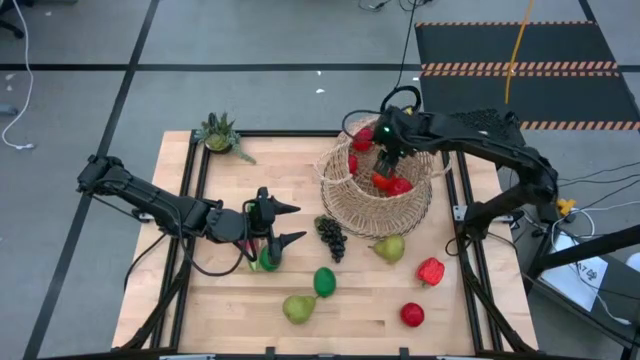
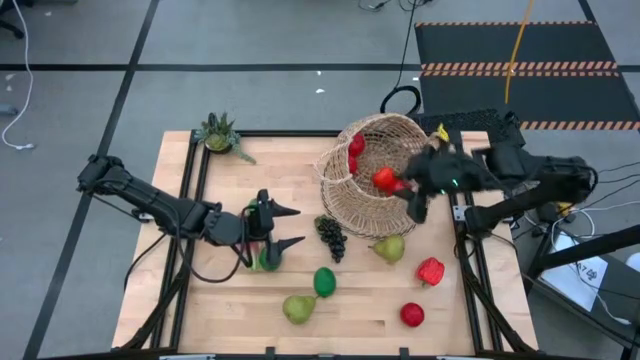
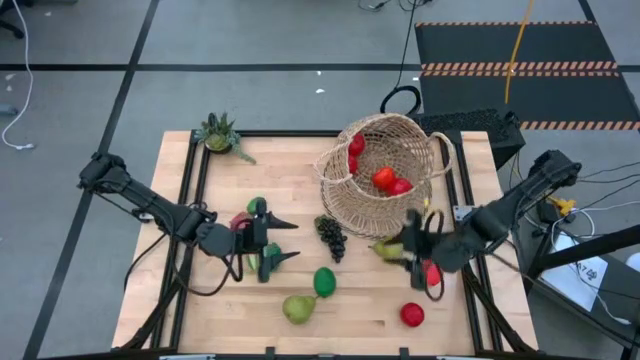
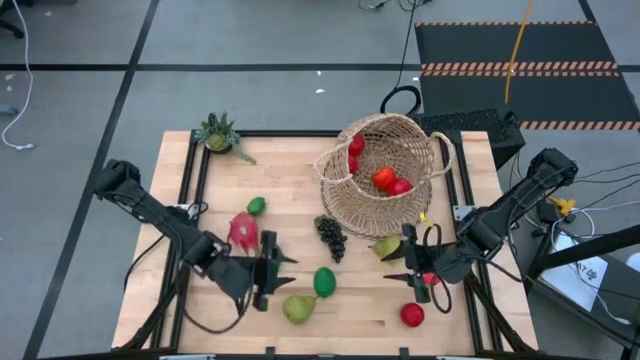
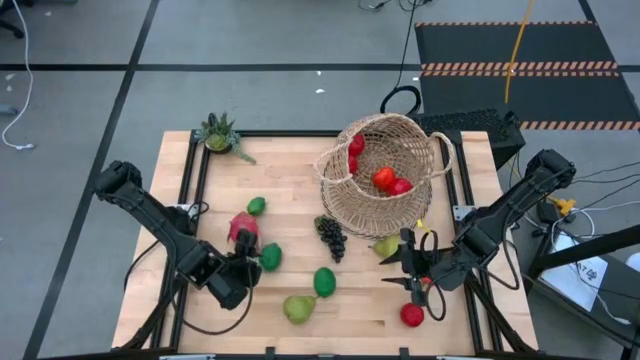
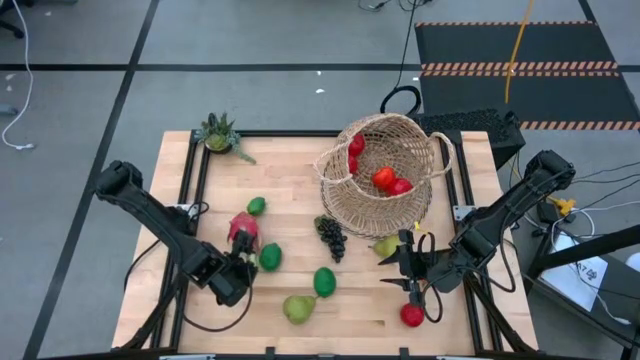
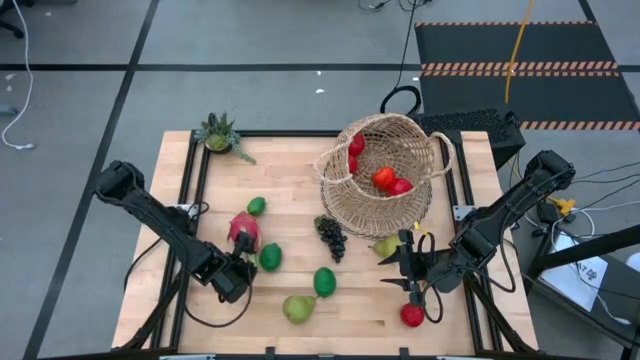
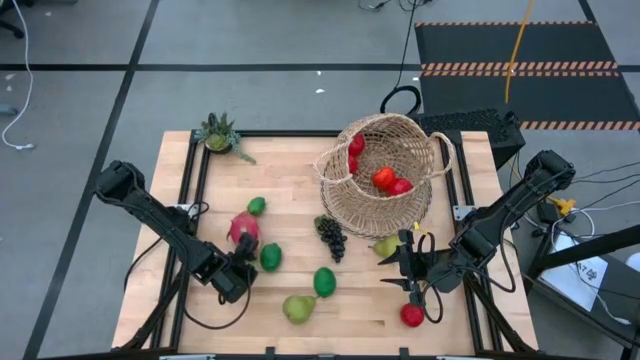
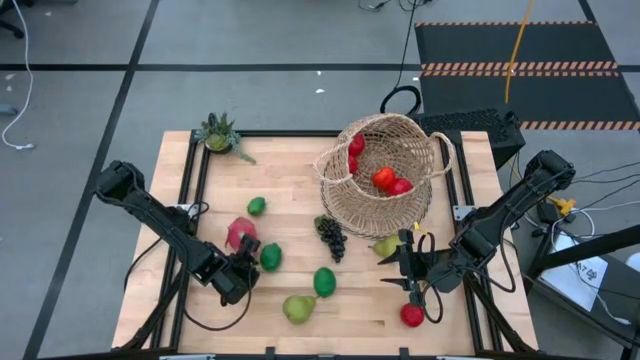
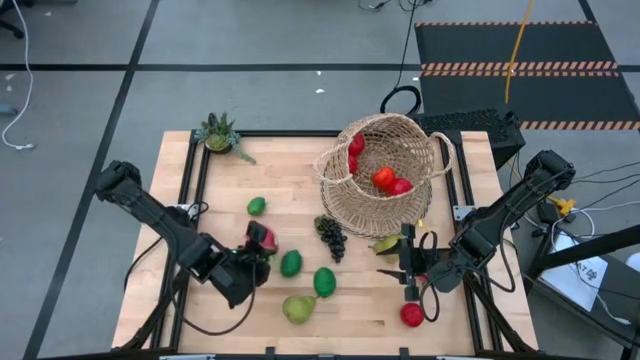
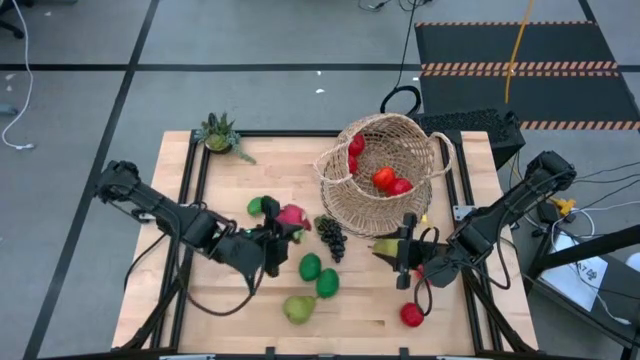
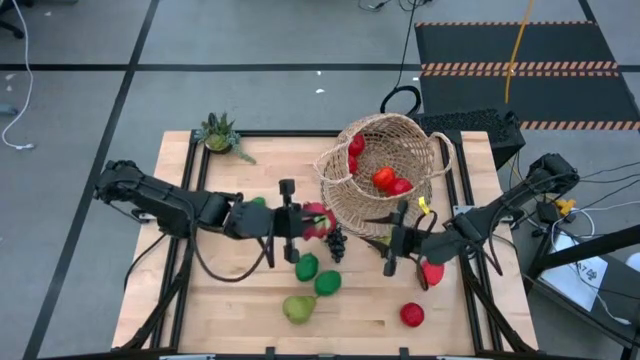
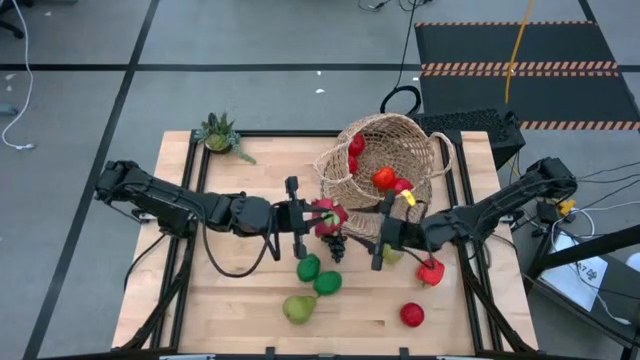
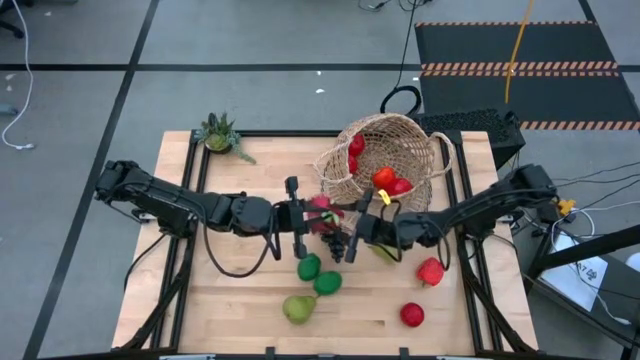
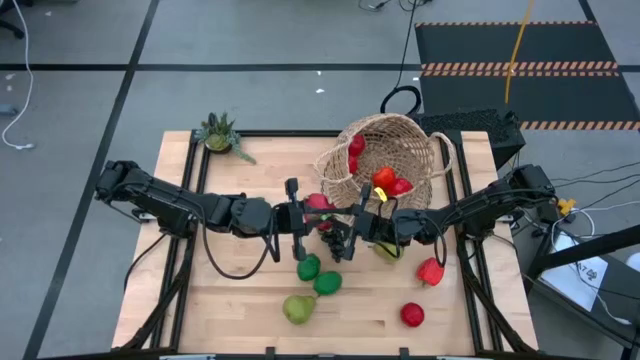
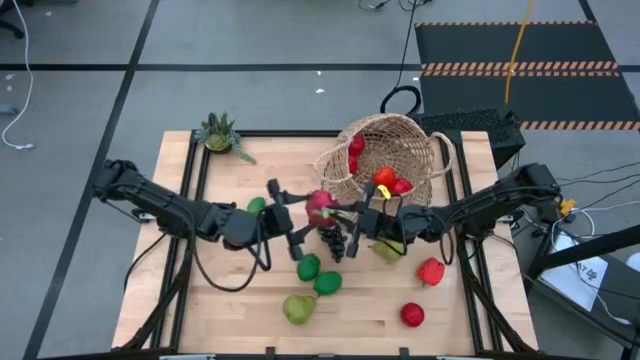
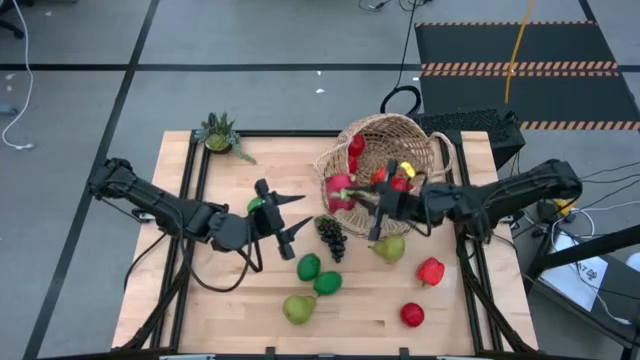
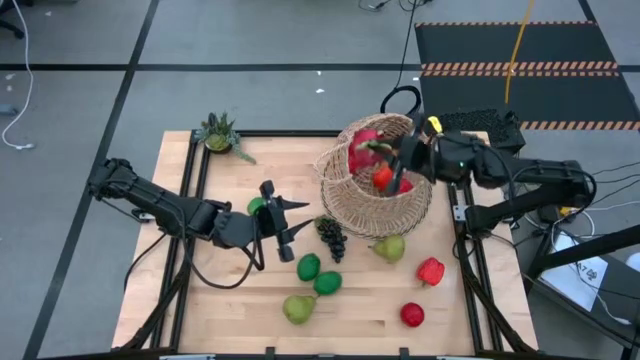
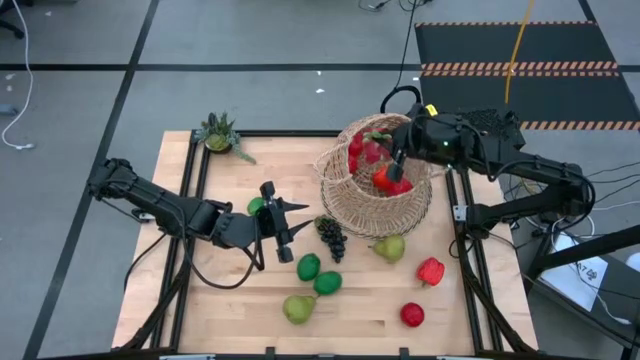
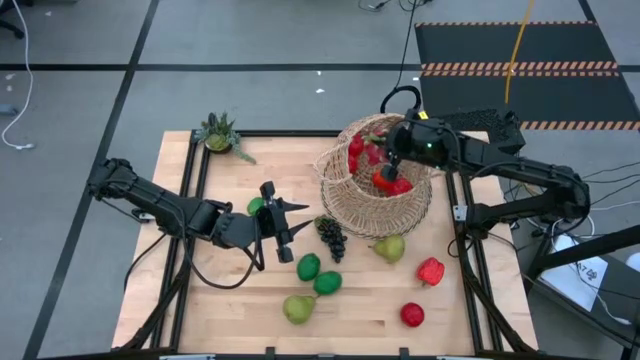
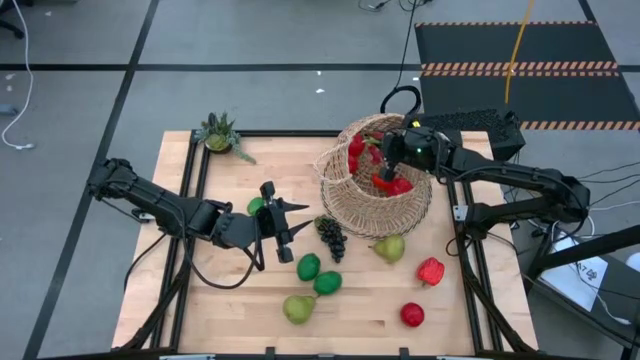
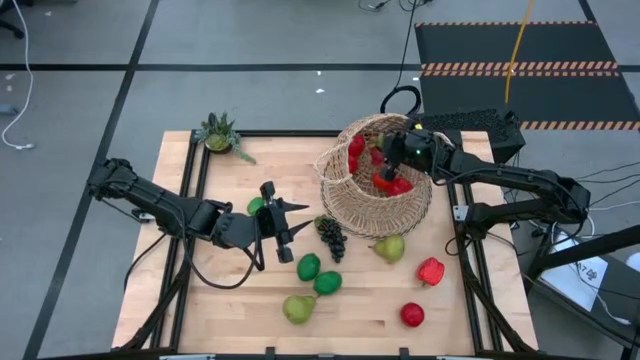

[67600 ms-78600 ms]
Task: Build produce basket
Put the pink dragon fruit into the brown basket

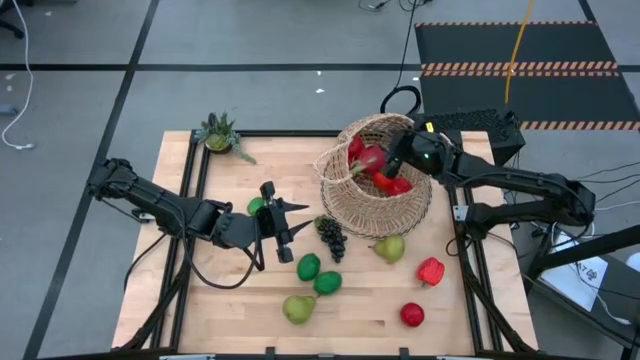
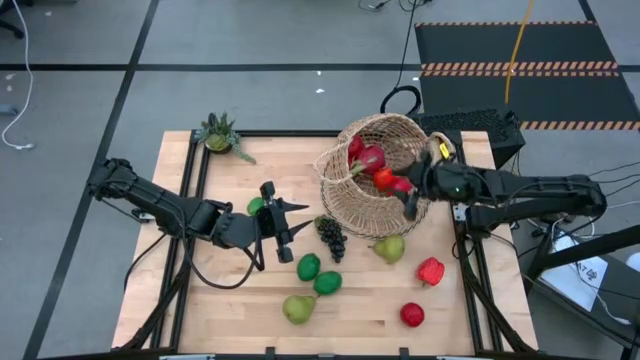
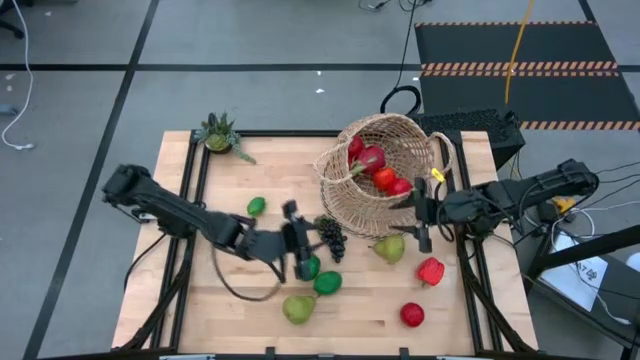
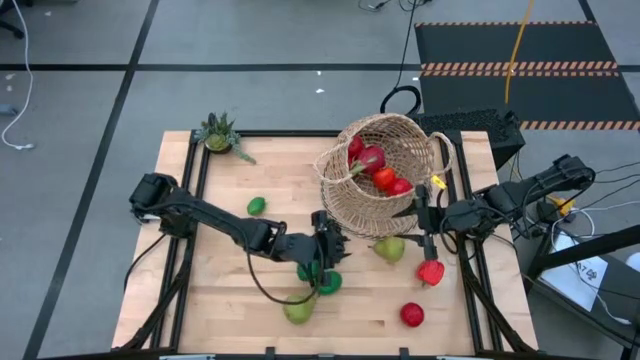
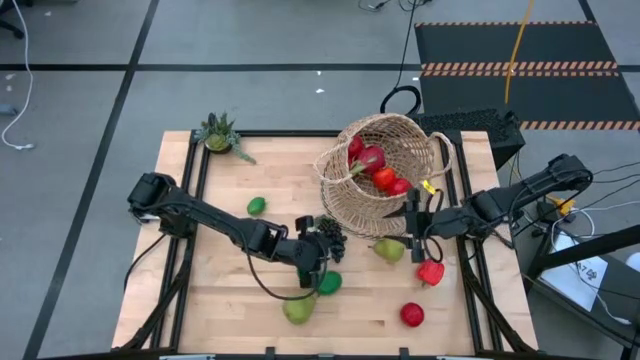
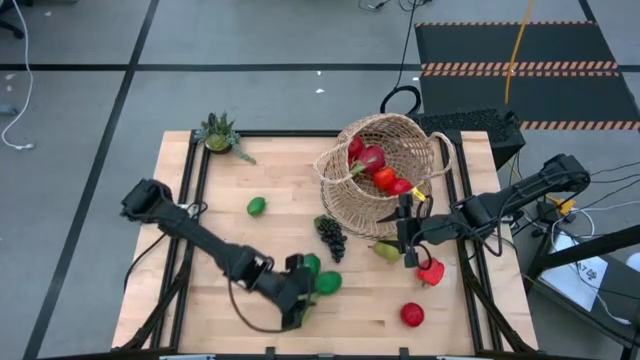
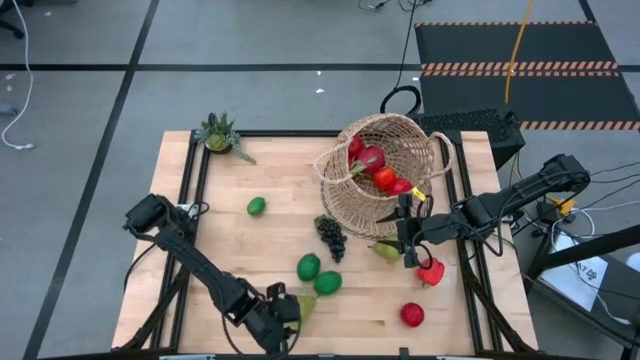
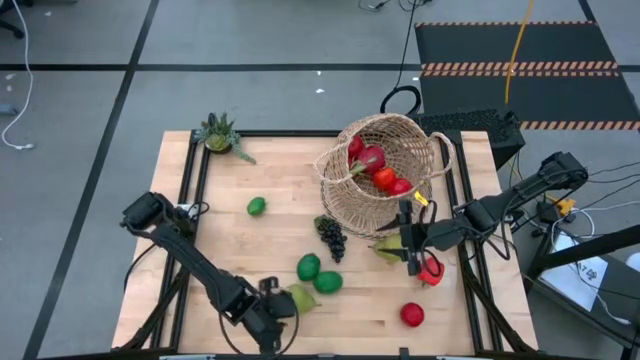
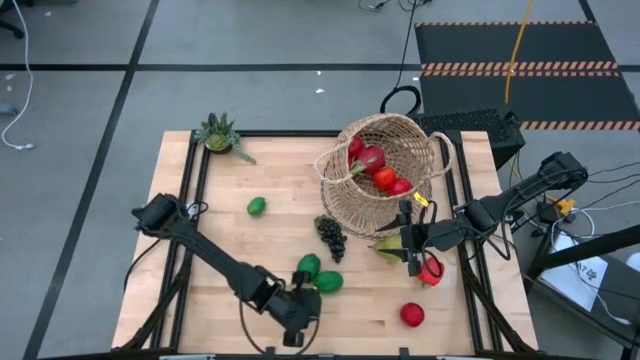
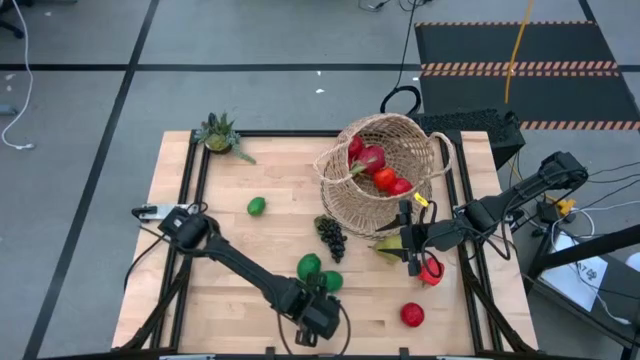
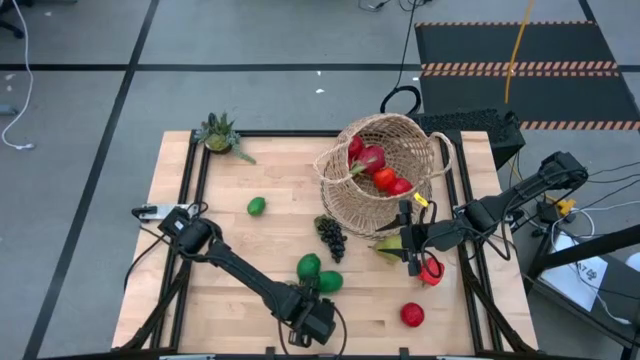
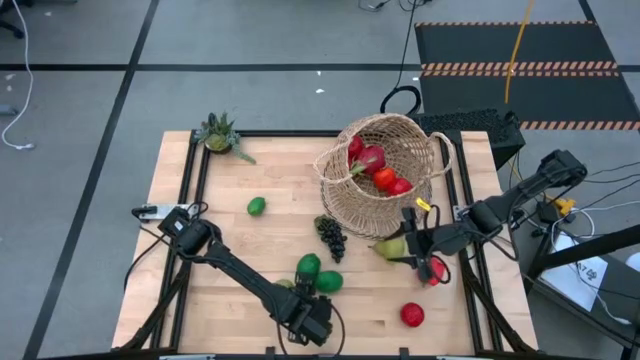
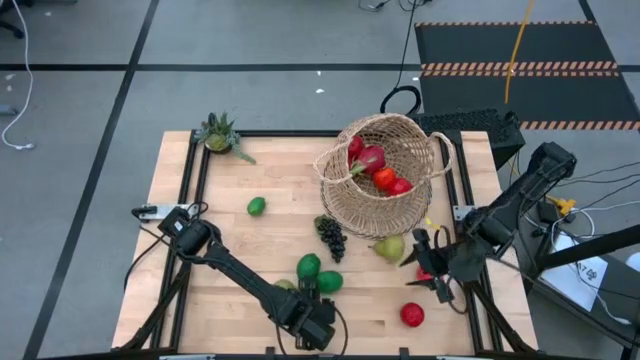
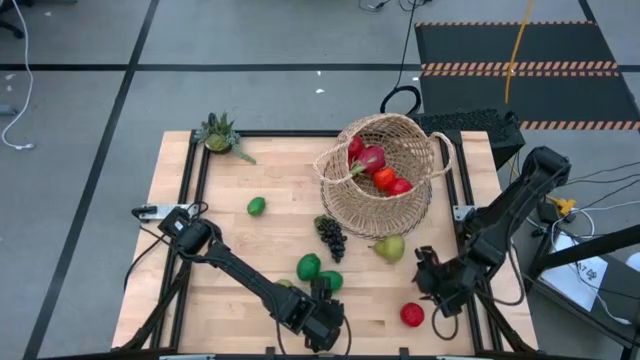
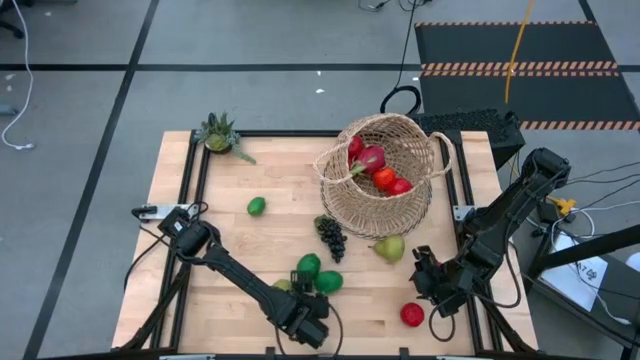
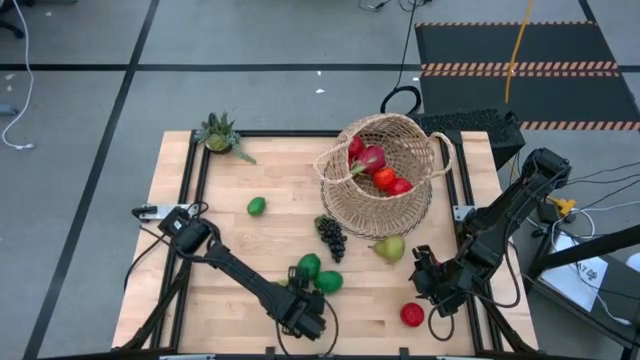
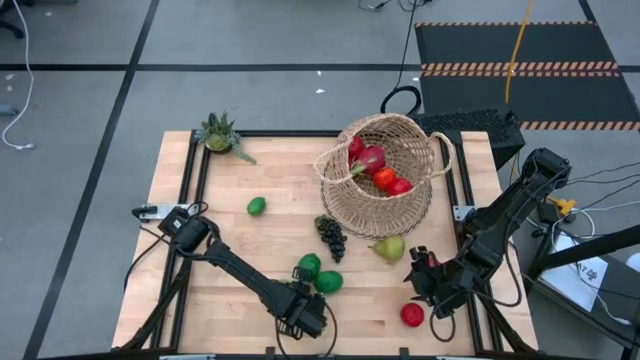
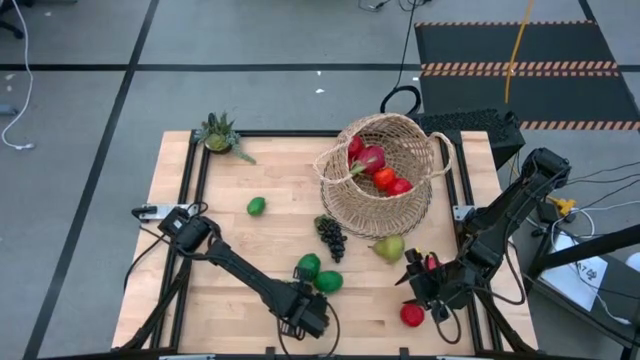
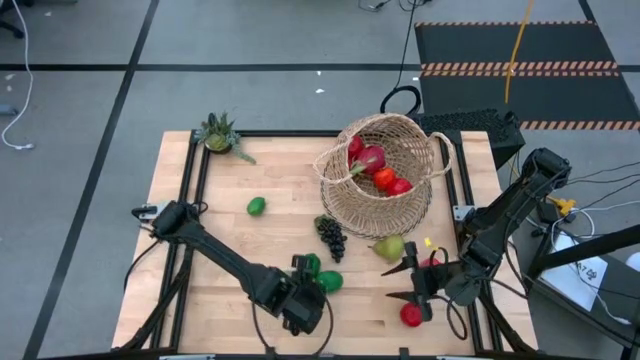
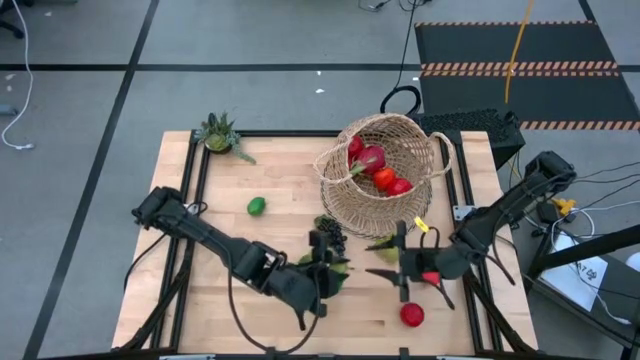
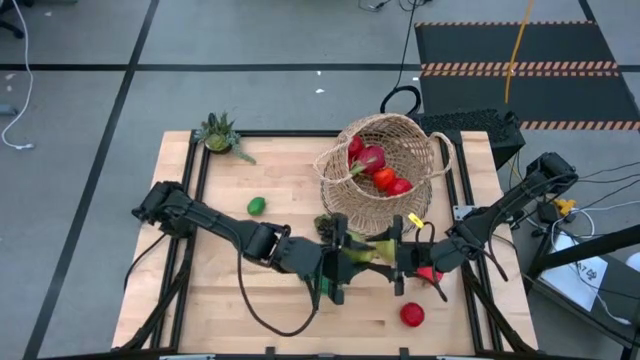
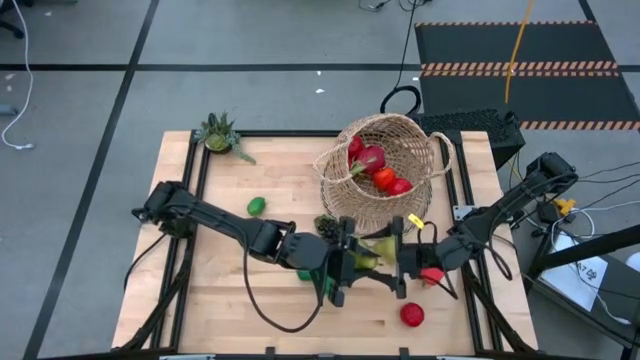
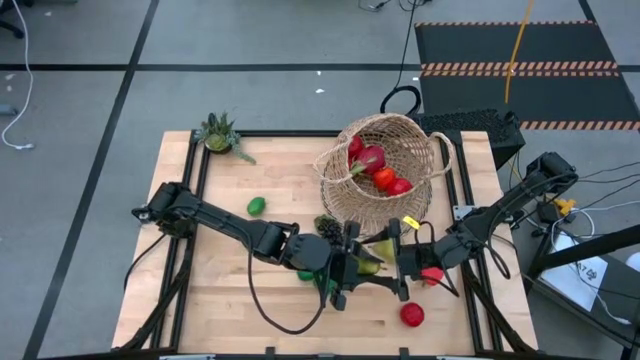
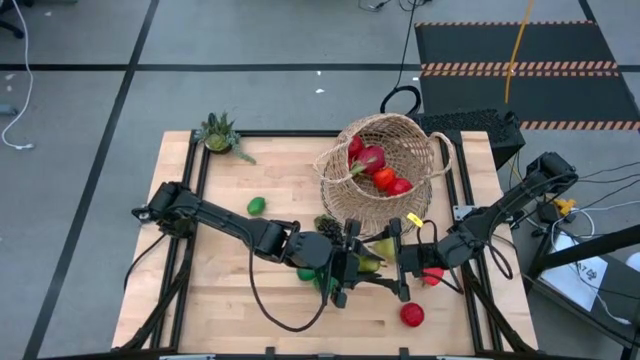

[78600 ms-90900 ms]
Put the green pear into the brown basket
